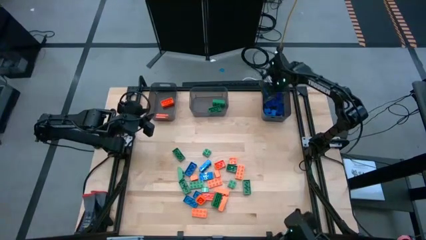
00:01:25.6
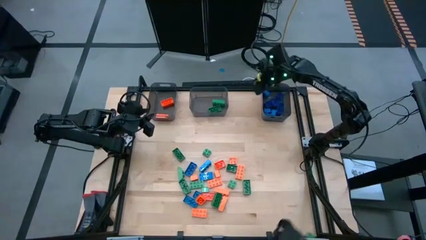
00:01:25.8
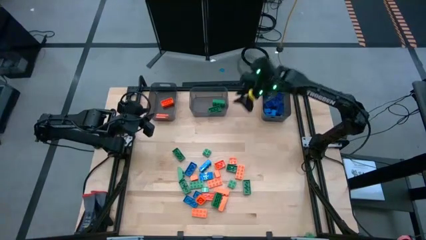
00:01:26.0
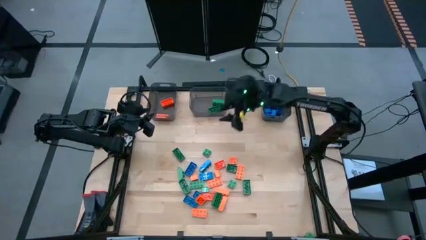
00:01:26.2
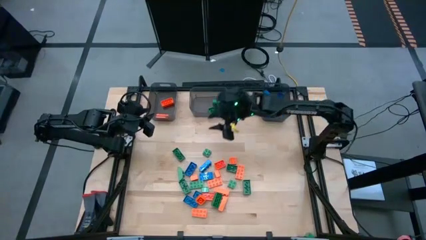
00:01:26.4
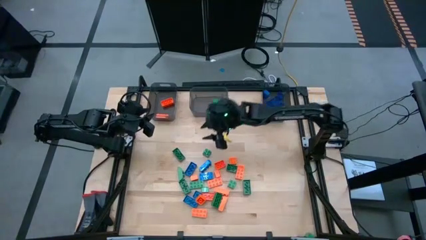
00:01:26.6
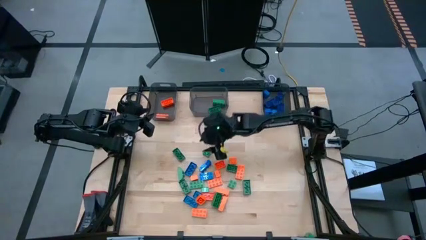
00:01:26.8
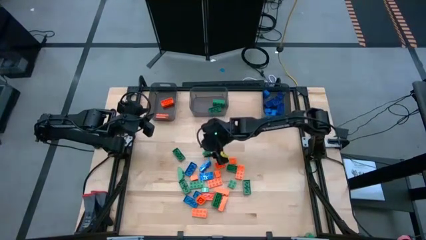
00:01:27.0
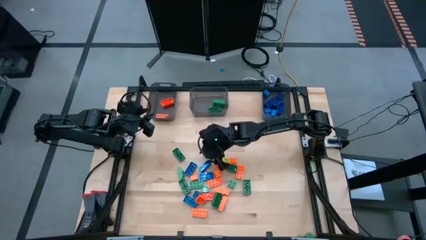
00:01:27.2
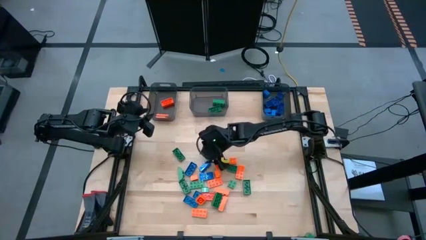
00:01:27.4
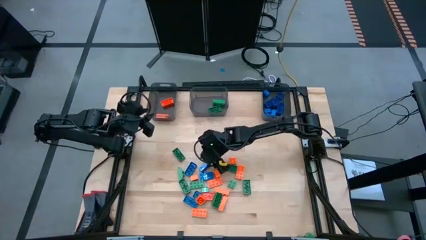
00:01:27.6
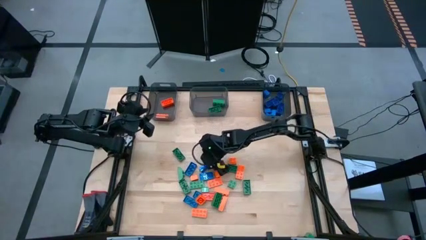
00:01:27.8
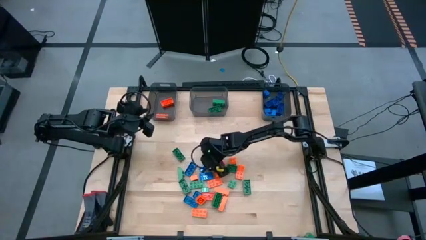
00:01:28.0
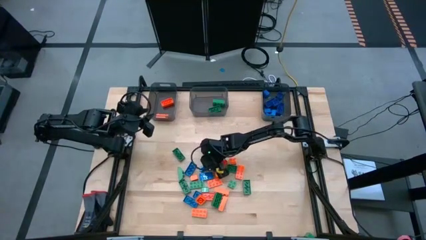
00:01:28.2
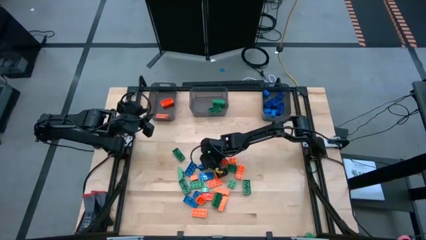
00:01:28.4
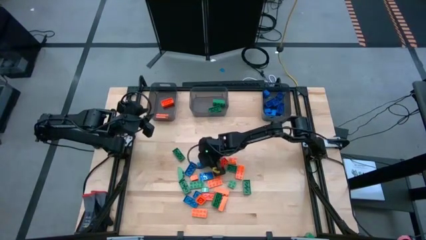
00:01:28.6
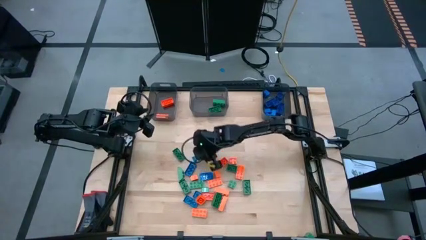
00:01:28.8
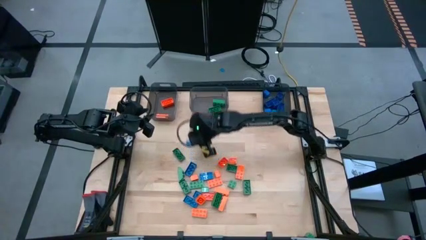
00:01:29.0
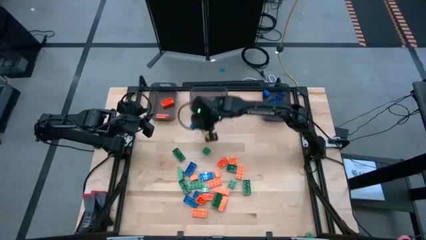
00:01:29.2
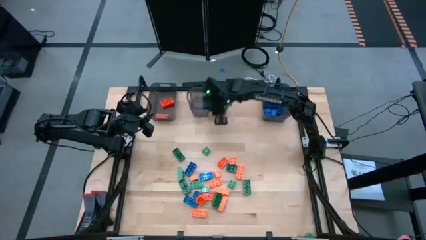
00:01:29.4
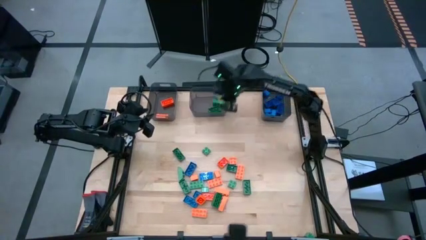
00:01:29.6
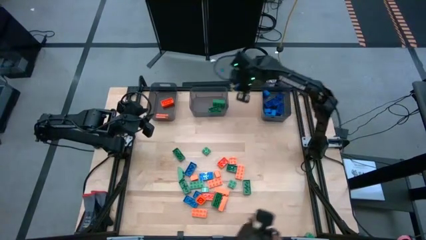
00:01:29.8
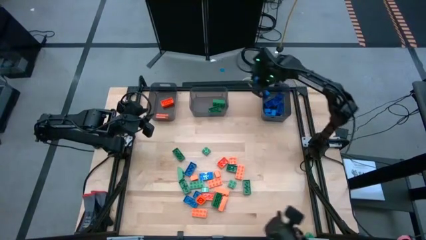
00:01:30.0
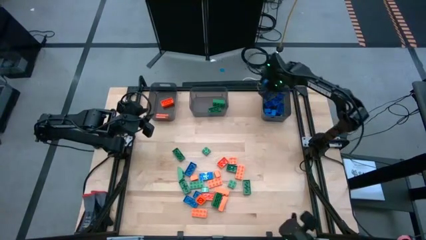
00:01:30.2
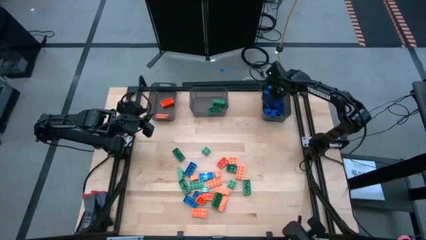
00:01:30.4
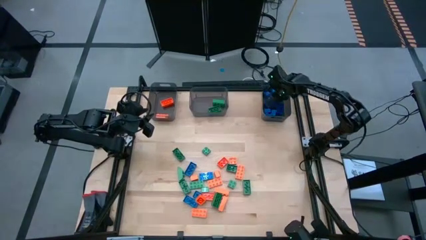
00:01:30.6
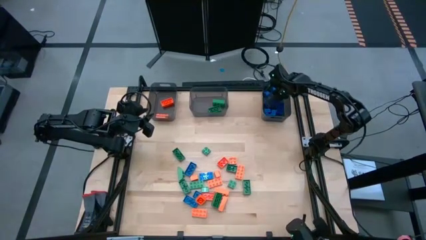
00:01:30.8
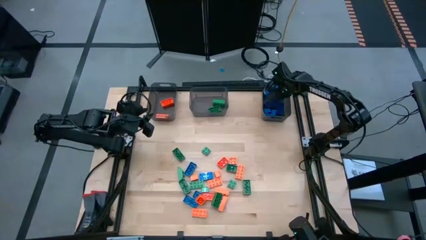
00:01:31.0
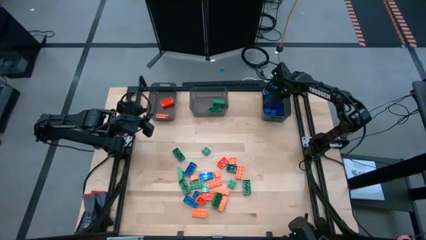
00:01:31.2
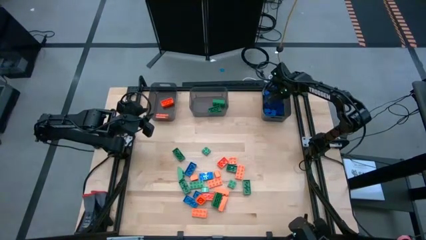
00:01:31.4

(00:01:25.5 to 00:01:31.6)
Task: Sort blocks
Put the blue game piece into the right black bin

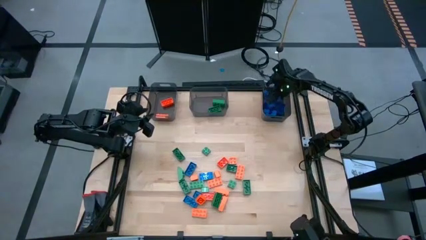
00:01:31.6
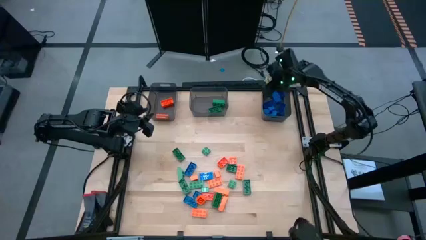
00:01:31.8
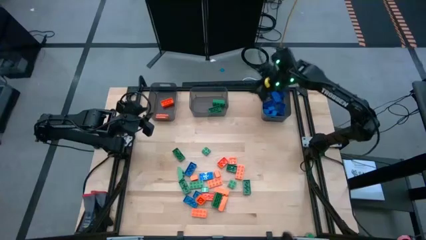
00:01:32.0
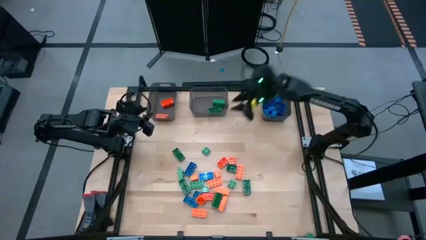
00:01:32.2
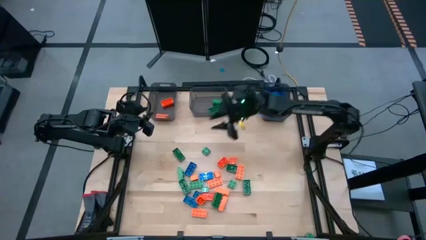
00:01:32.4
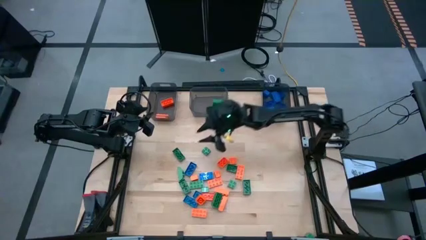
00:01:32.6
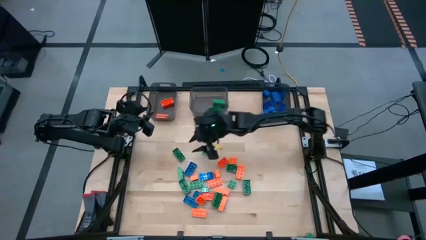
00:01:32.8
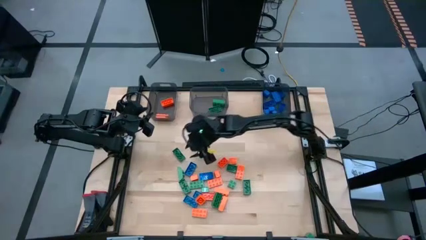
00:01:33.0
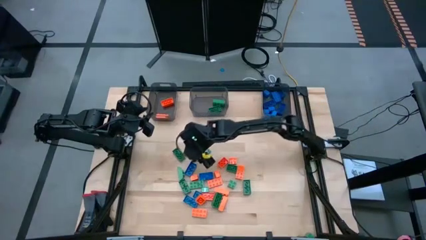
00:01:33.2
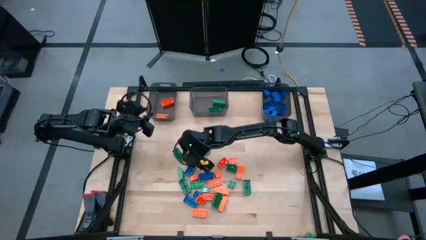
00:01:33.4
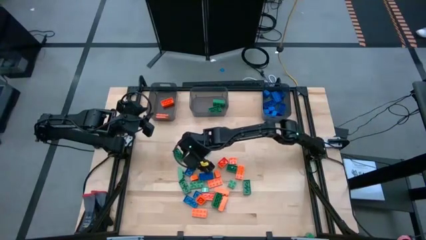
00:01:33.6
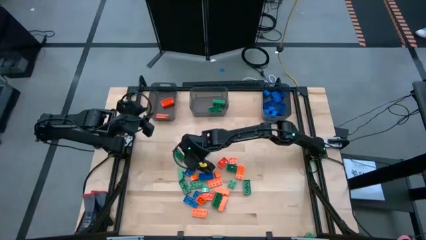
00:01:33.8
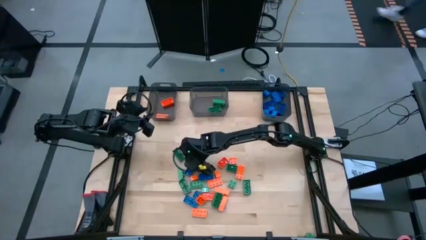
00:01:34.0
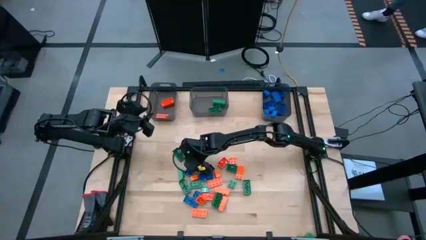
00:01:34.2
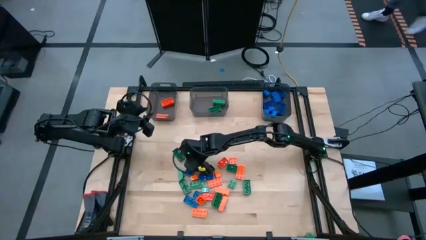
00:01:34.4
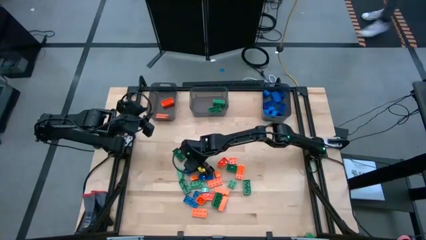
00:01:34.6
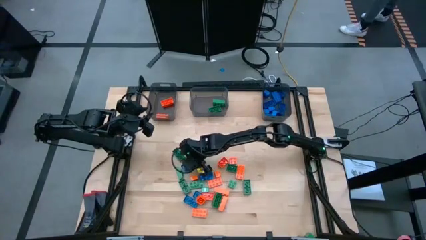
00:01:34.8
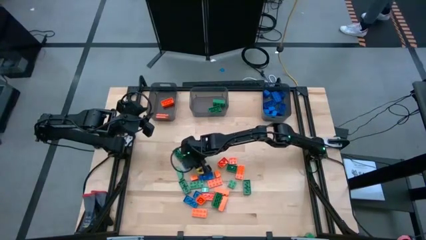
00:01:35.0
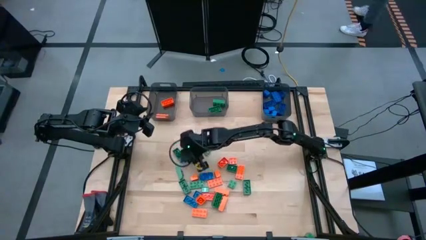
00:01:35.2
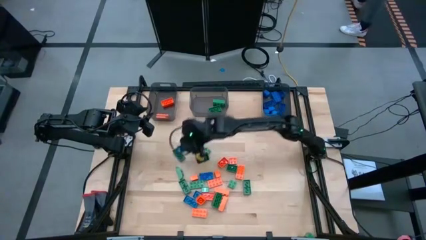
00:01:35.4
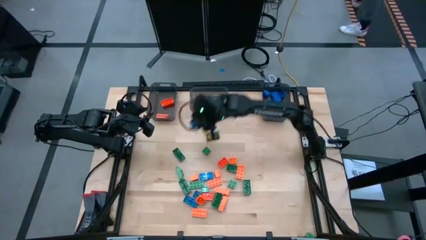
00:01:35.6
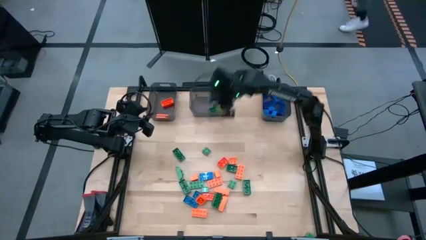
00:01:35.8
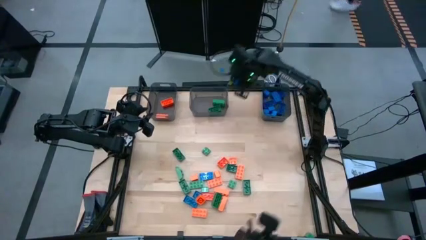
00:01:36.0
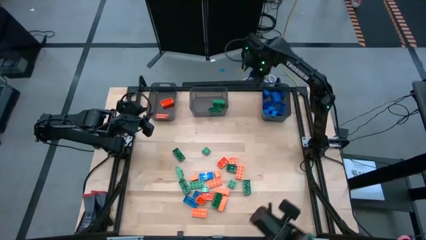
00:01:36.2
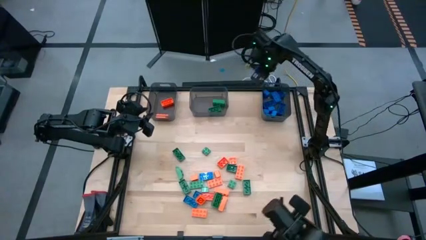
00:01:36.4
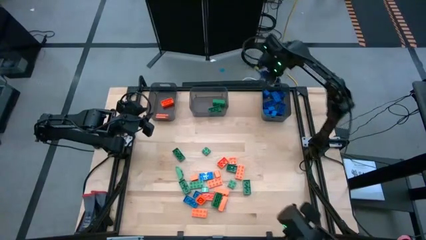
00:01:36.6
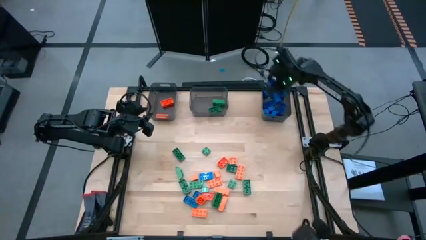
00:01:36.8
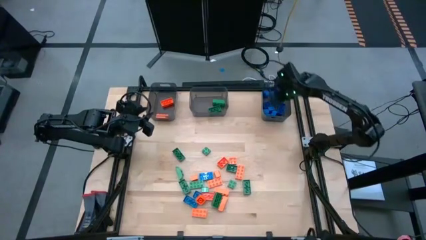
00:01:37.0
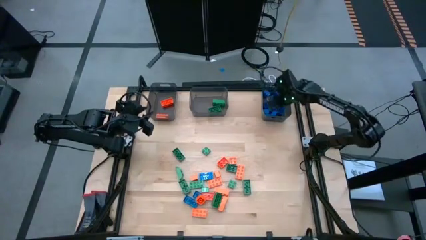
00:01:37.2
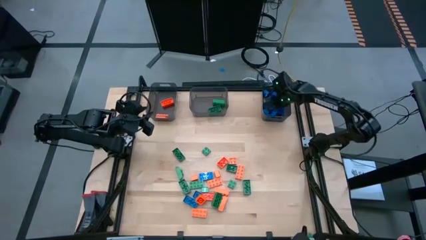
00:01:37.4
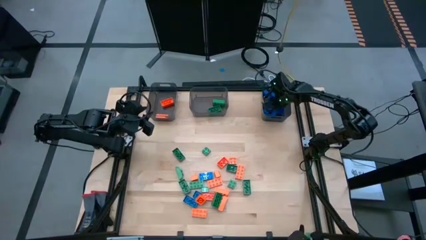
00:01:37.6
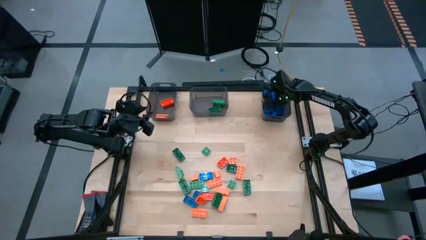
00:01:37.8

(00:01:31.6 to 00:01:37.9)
Put the blue game piece into the right black bin

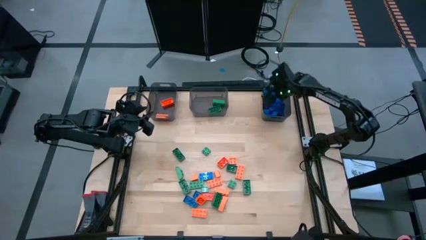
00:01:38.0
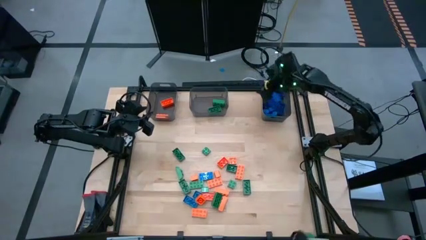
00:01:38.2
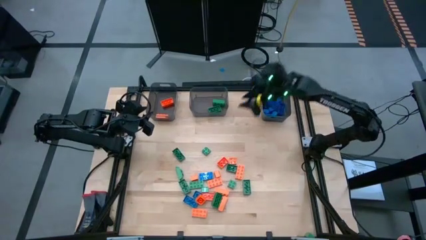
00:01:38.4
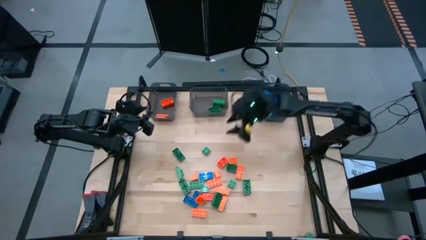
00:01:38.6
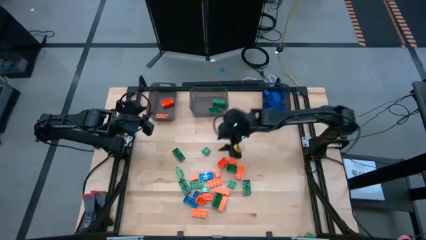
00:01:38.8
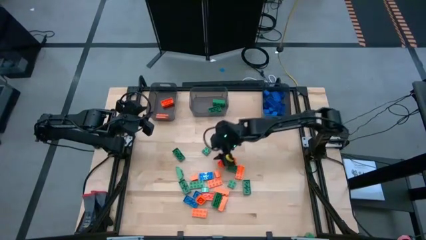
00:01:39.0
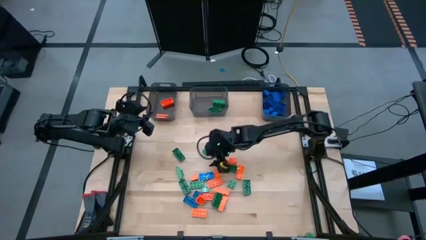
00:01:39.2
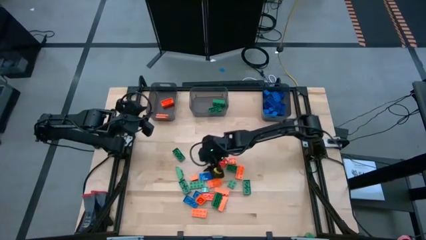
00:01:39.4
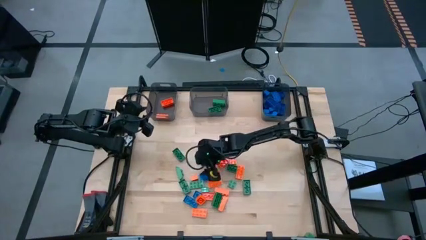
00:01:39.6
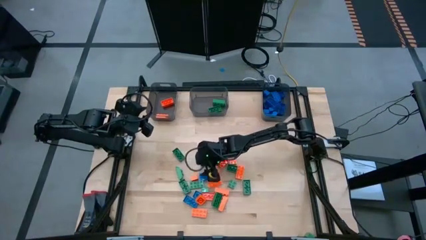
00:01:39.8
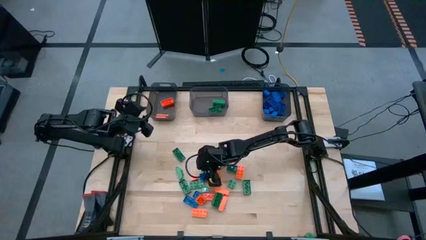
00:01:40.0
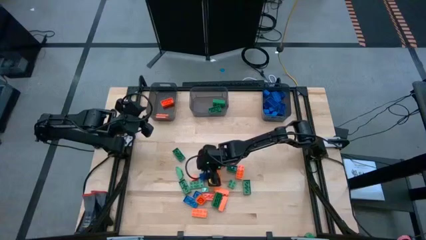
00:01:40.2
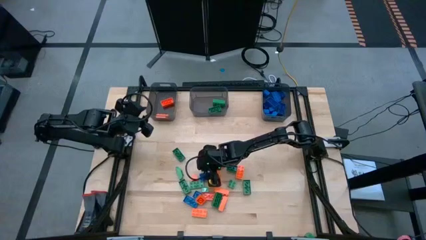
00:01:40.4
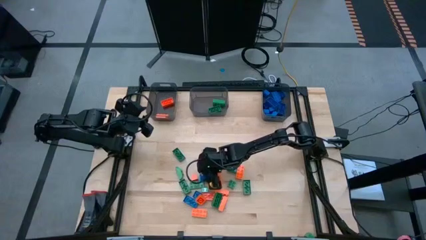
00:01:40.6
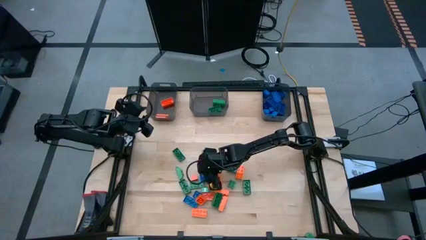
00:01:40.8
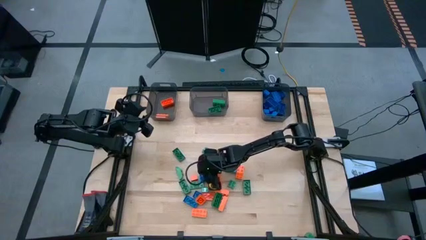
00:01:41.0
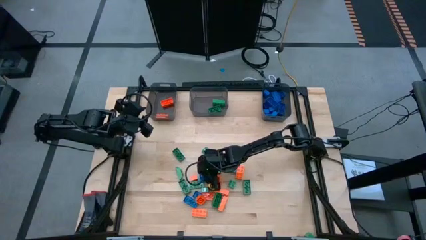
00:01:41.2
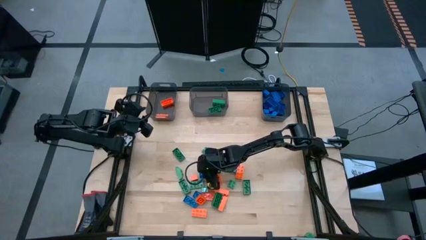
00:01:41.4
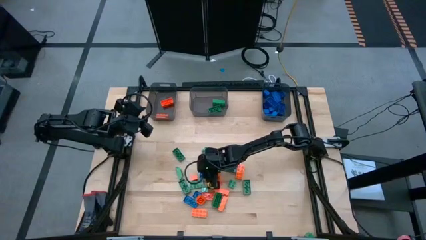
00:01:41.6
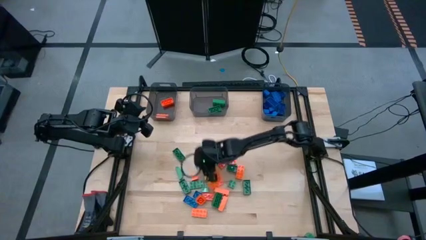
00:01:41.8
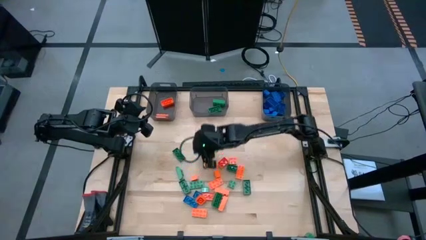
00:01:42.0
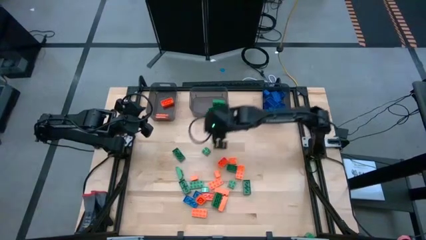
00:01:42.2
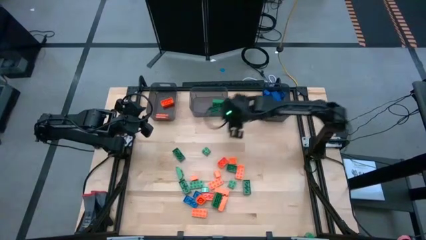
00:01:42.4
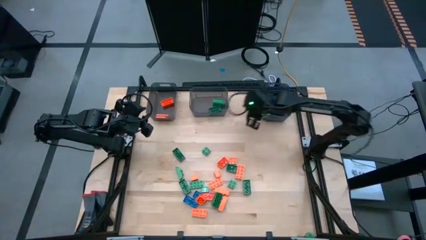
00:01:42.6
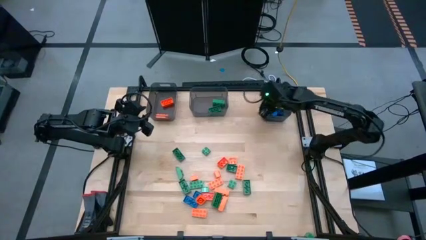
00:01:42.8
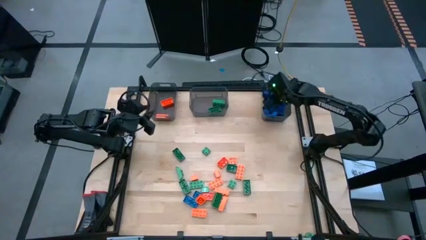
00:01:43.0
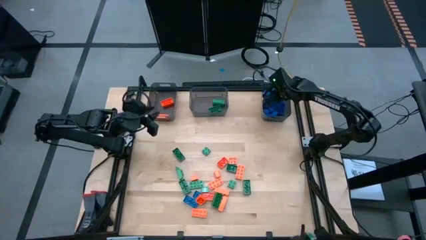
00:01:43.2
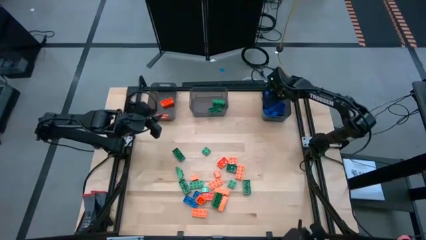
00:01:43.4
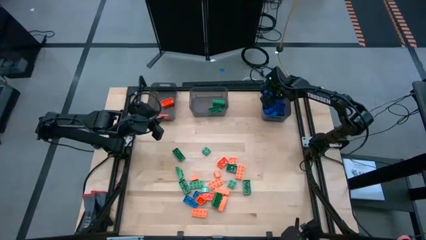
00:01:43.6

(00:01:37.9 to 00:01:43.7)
Put the blue game piece into the right black bin
